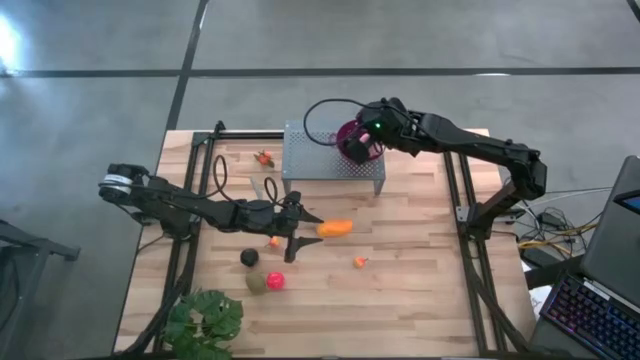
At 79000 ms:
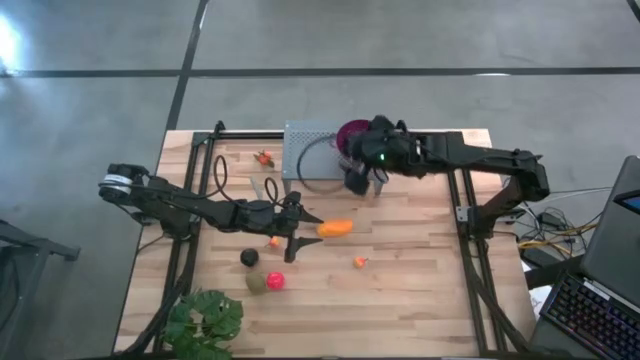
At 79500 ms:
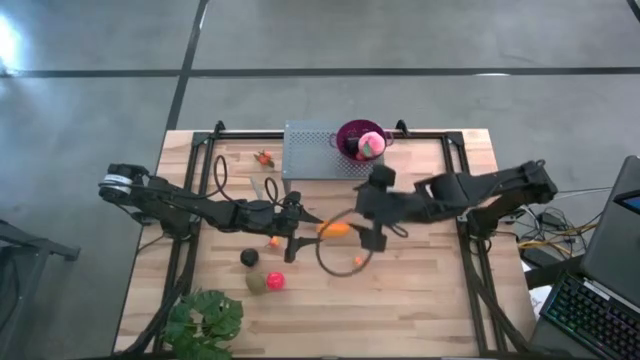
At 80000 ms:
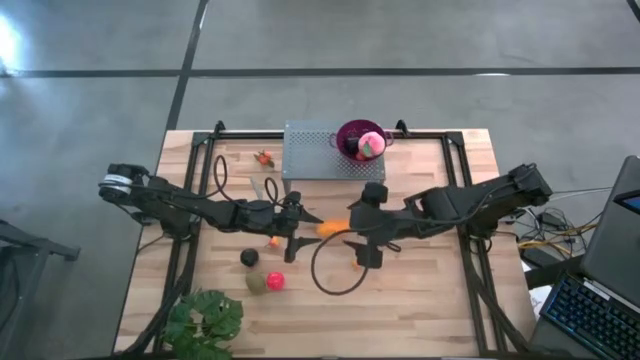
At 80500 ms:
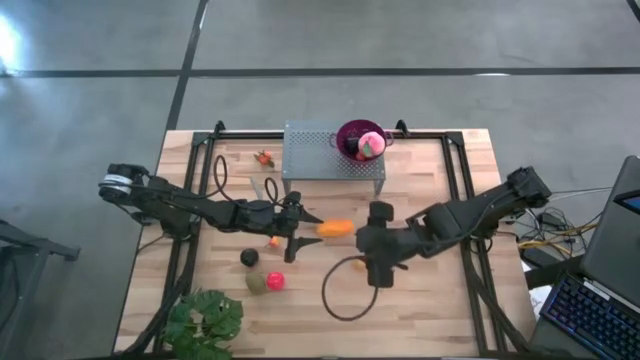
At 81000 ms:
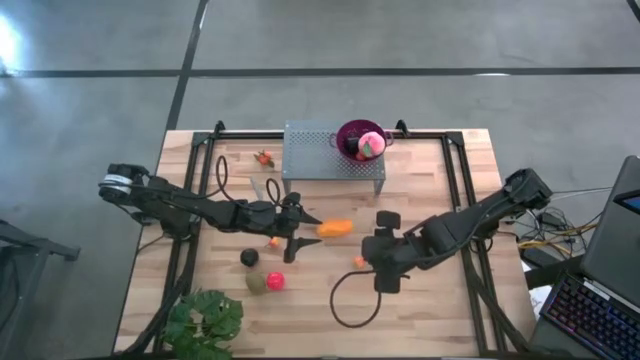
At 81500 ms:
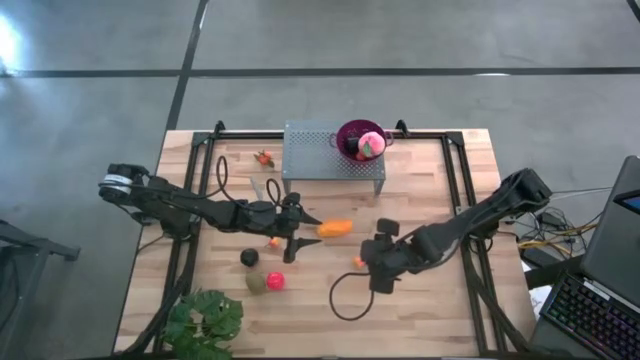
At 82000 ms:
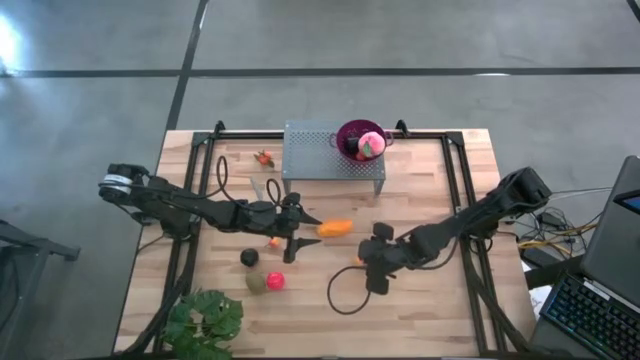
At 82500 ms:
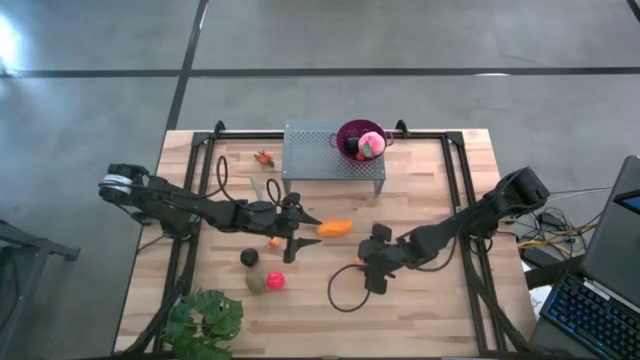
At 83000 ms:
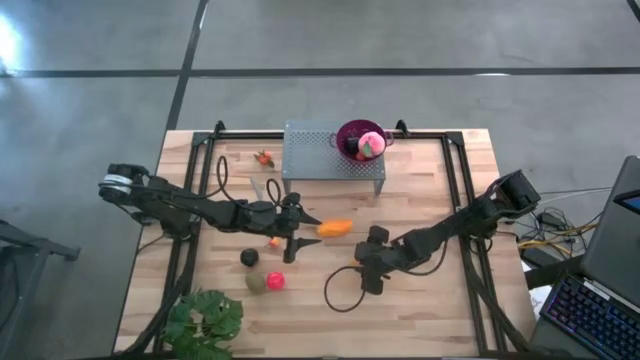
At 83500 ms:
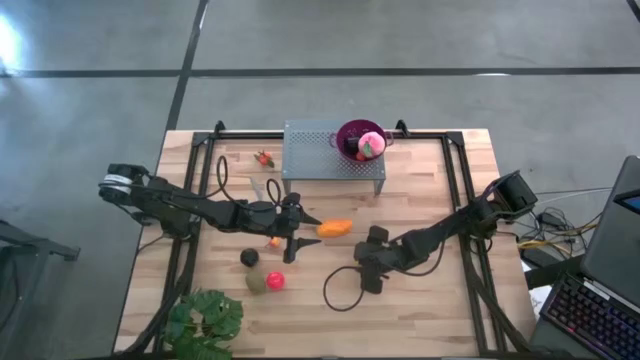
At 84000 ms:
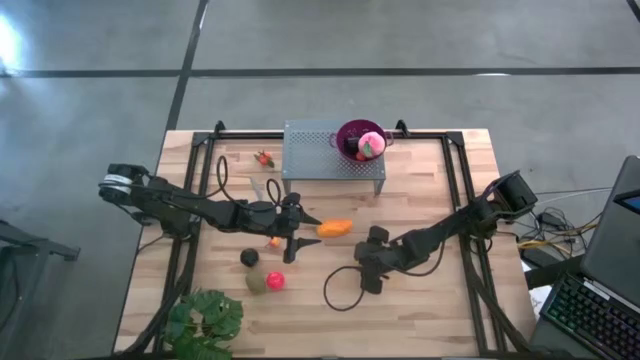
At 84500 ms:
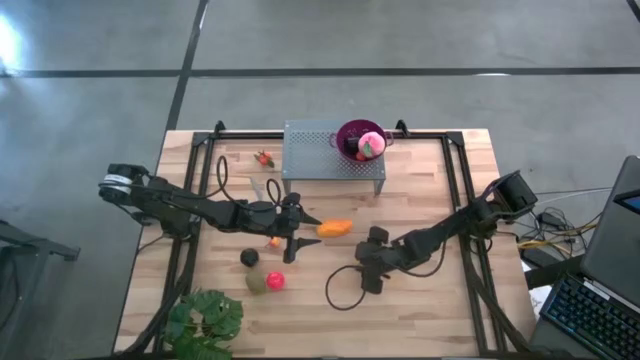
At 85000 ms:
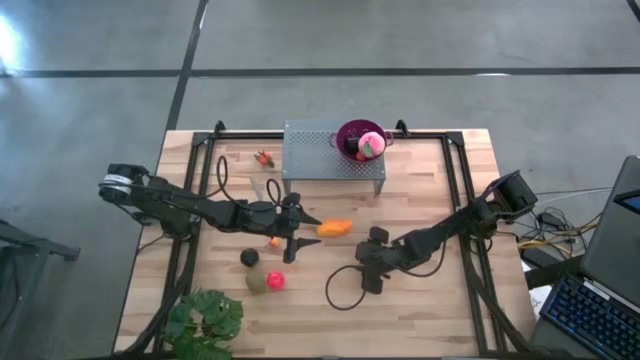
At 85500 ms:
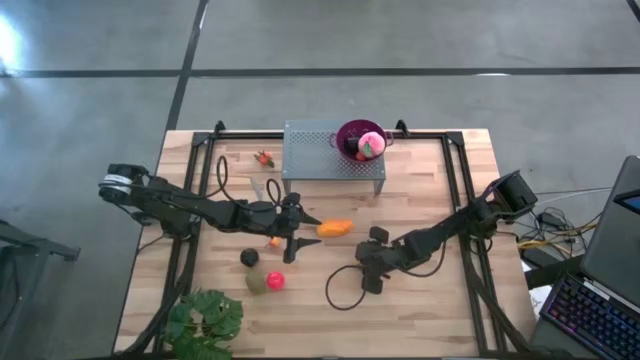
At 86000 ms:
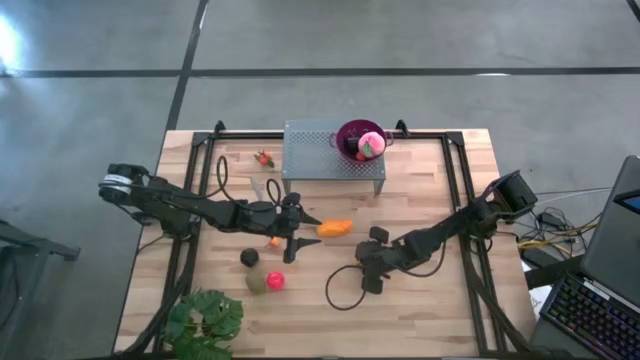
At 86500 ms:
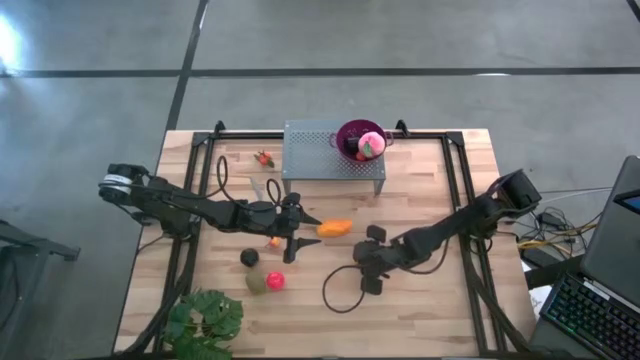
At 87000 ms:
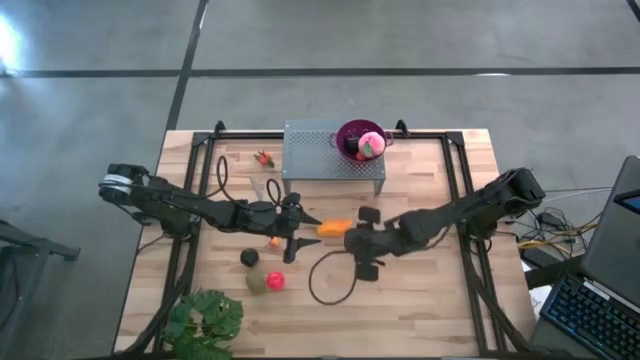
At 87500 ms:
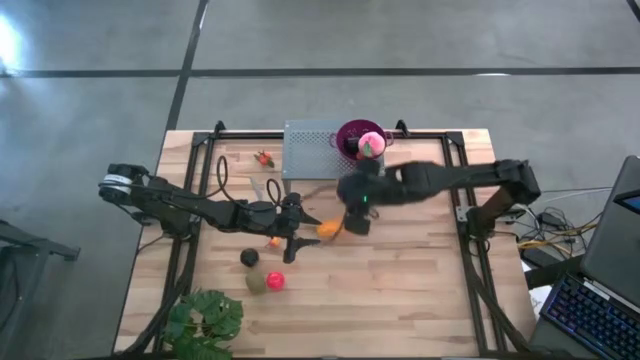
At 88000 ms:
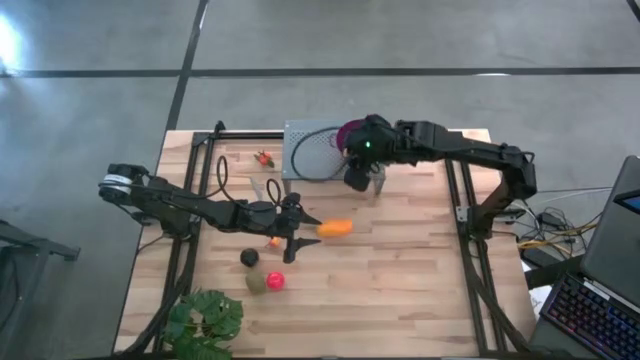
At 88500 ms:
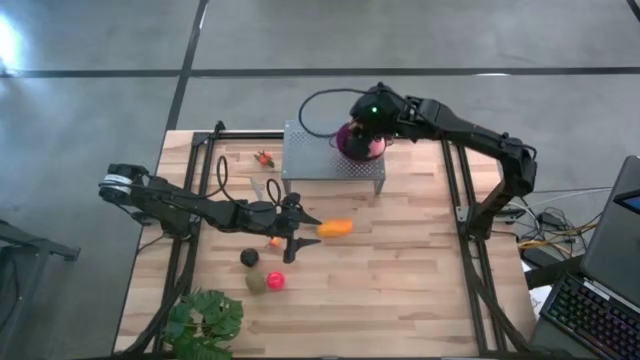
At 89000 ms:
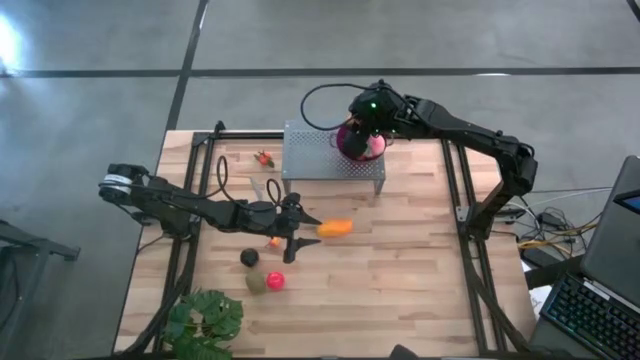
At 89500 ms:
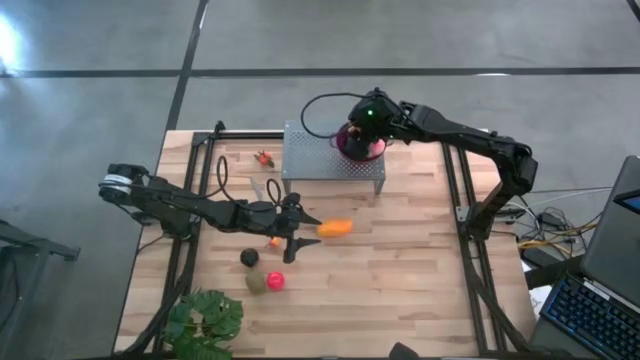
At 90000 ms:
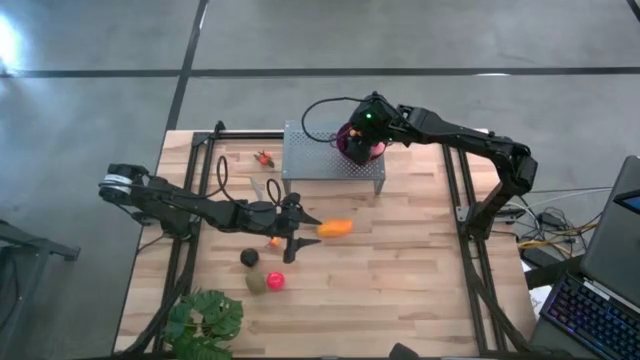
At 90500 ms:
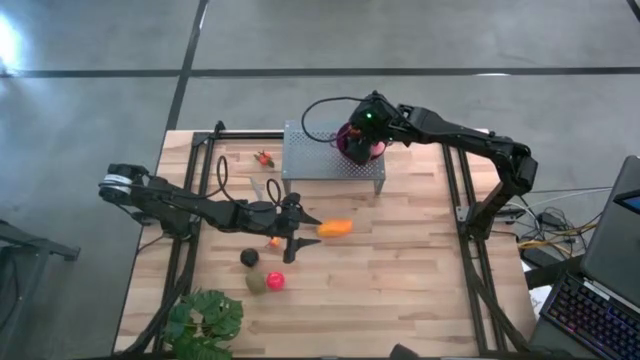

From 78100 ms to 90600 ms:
Task: Pick & Place Fruit
Put the pear into the purple bowl on the shelf

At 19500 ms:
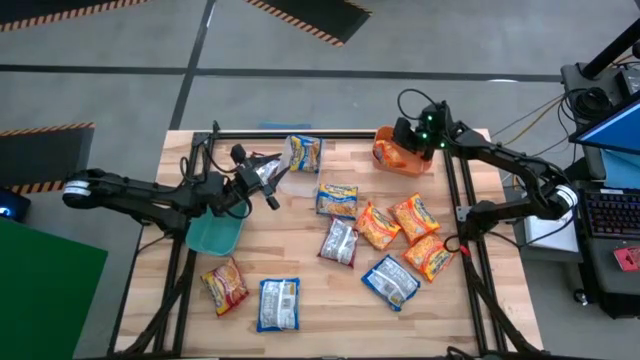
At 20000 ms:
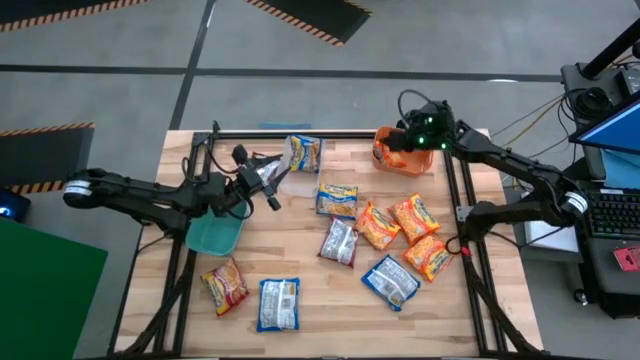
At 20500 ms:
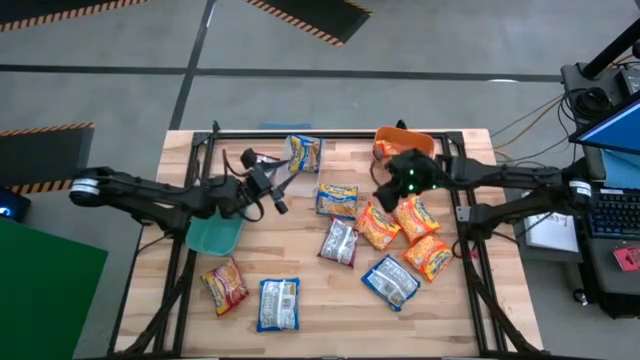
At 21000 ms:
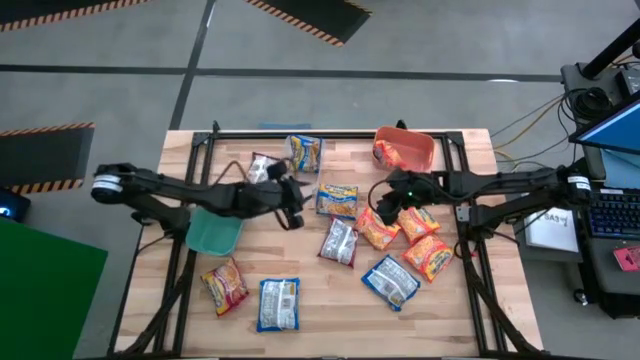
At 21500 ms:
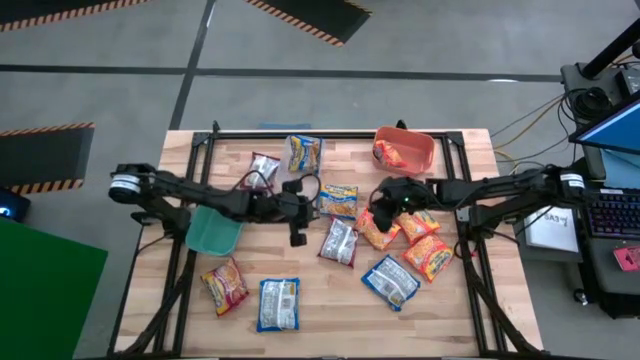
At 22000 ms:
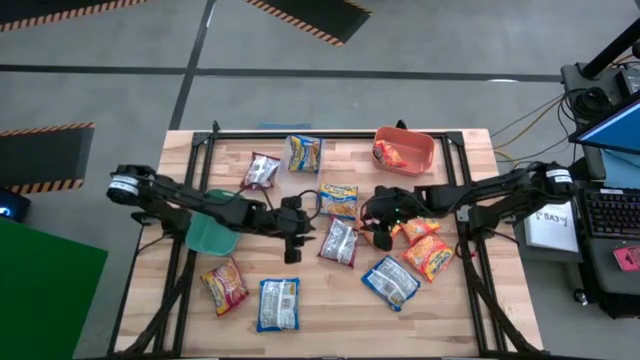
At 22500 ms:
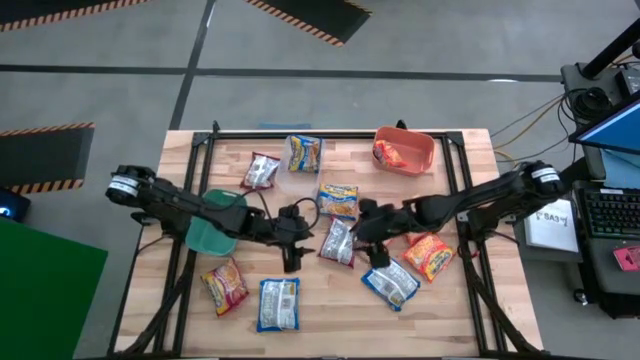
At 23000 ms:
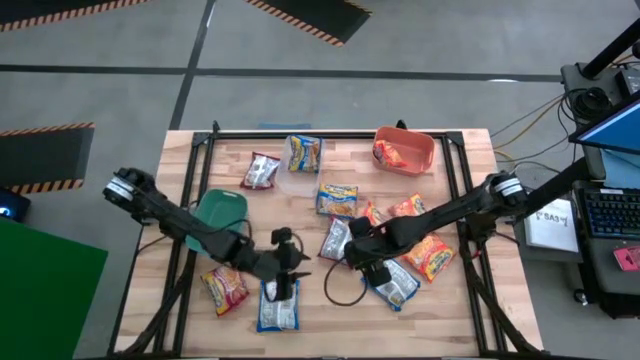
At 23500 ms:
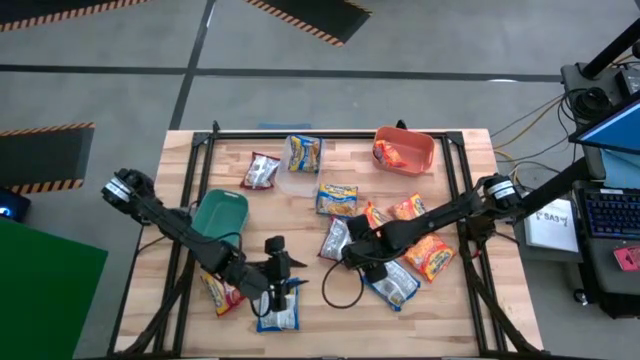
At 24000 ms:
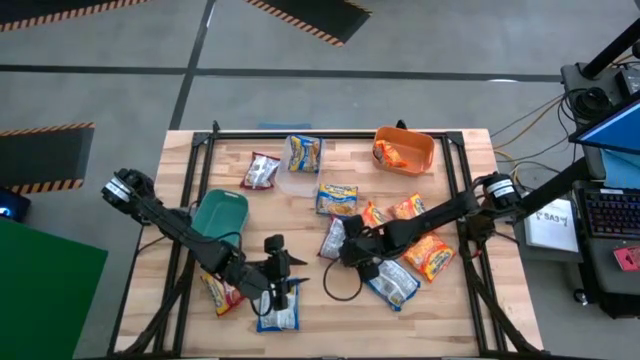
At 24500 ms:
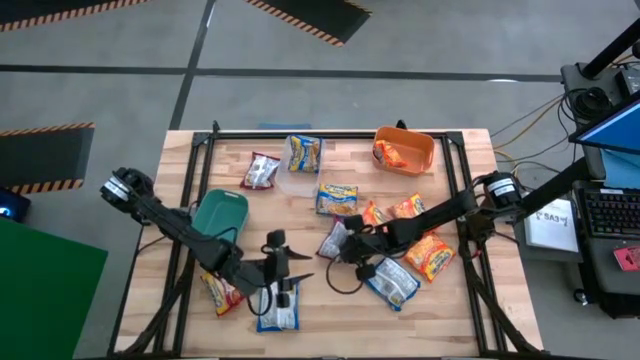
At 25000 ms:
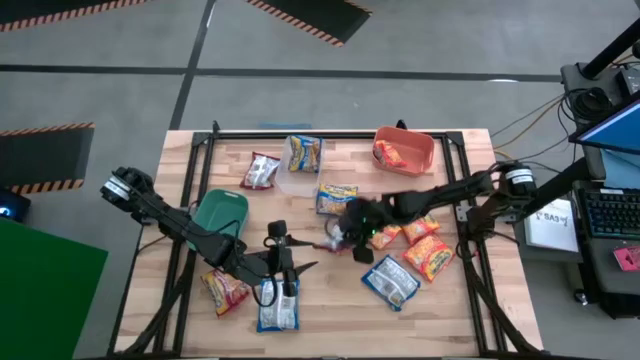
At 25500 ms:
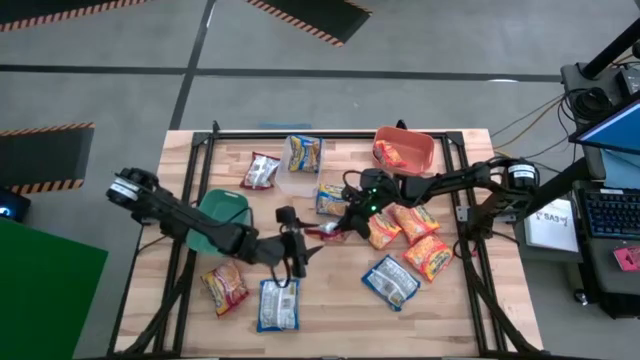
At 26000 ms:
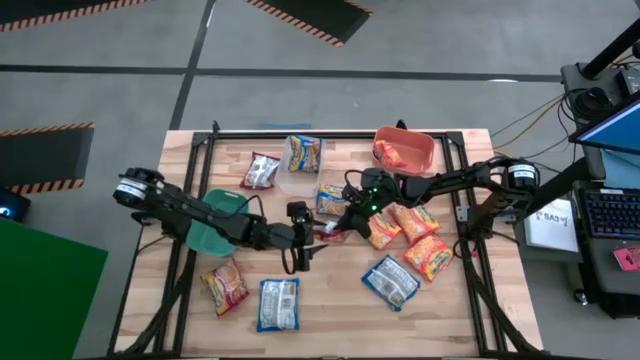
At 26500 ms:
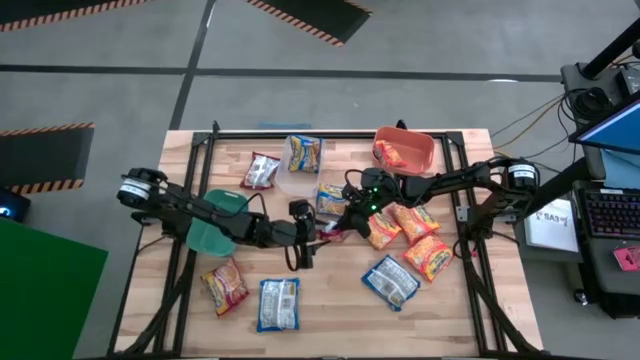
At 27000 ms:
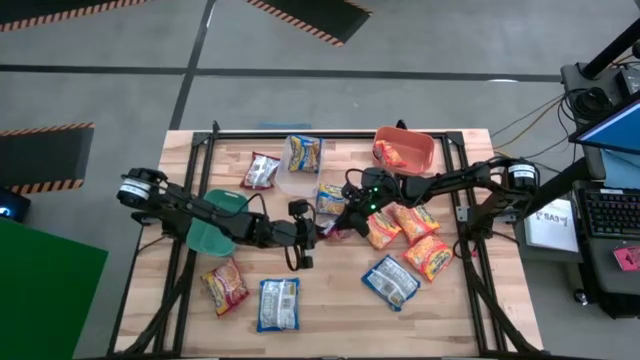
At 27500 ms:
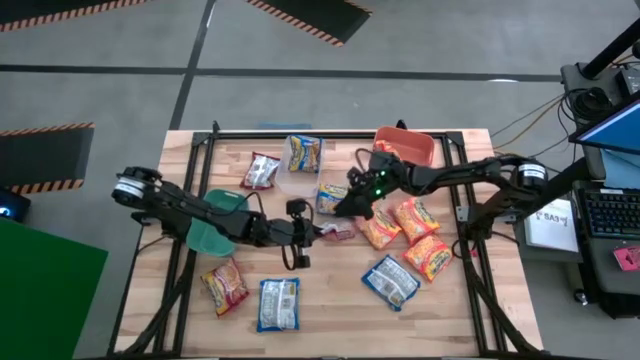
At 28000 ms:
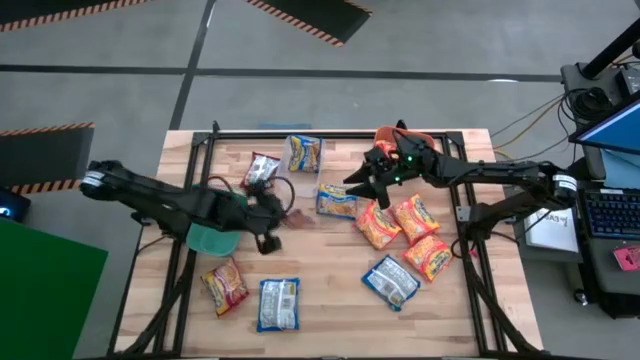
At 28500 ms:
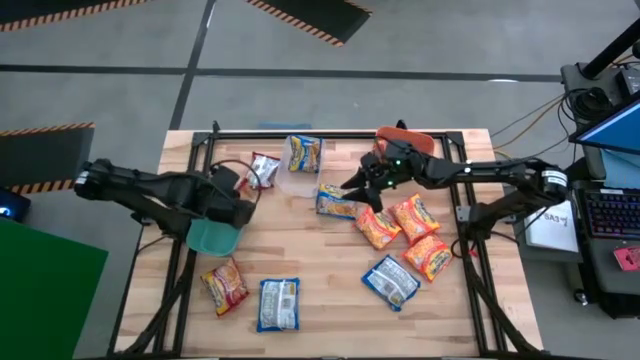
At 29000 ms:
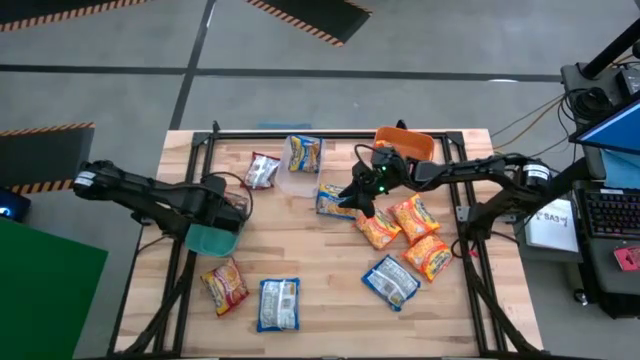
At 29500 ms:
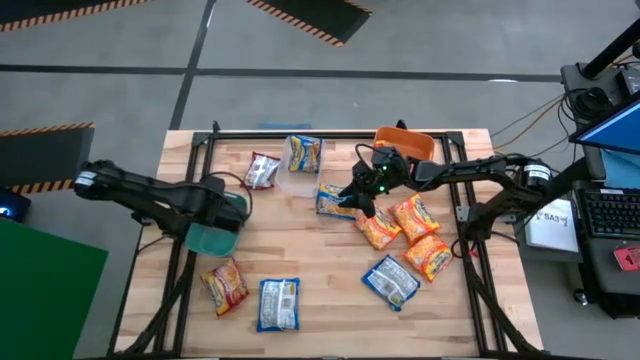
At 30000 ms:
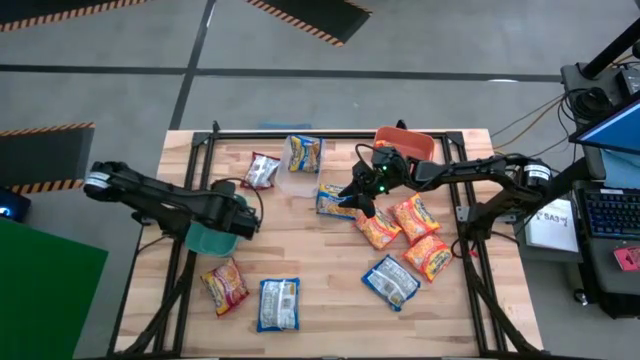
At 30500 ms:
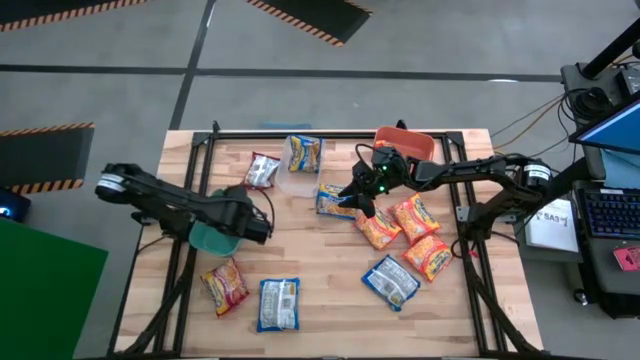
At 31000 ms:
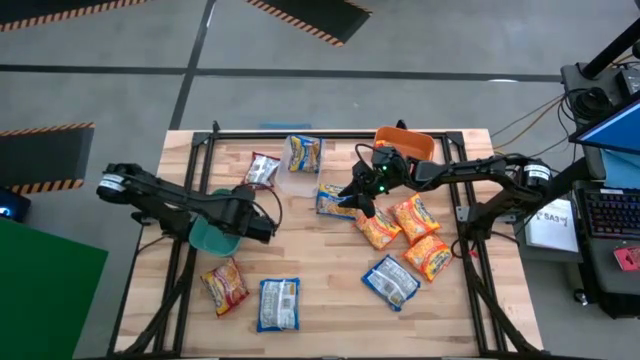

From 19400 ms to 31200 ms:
Task: Sort Maruchan noodles
Put the red noodle pack into the blue bin
